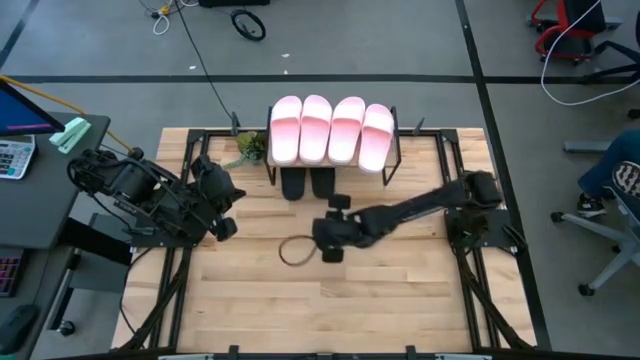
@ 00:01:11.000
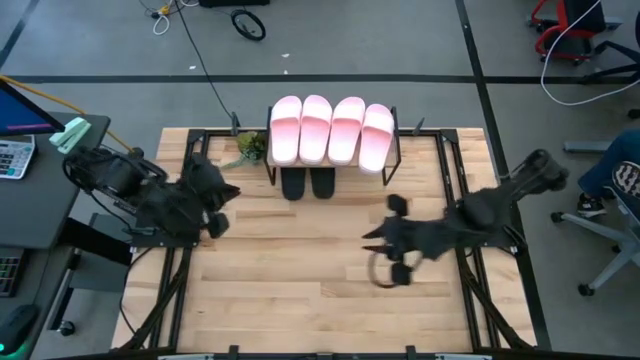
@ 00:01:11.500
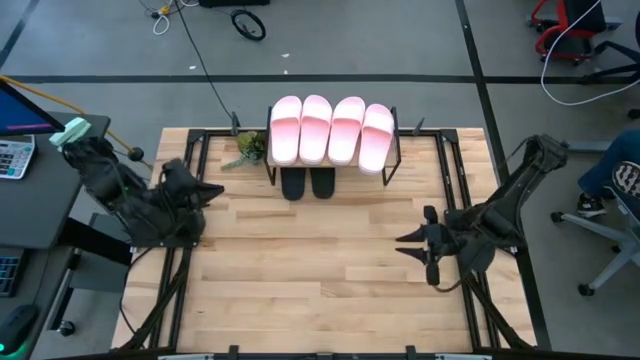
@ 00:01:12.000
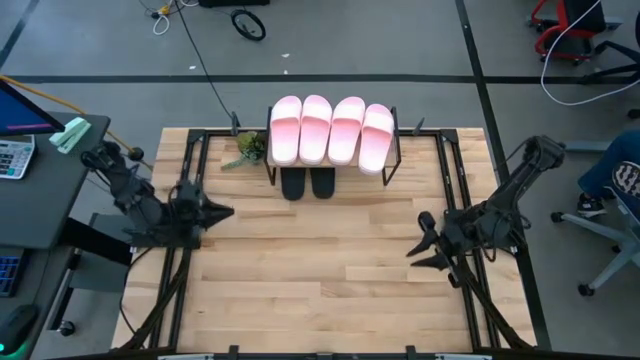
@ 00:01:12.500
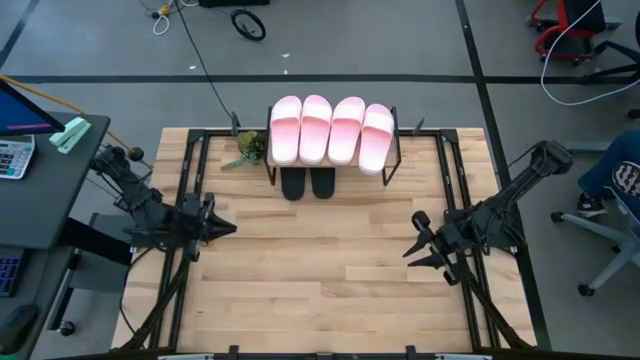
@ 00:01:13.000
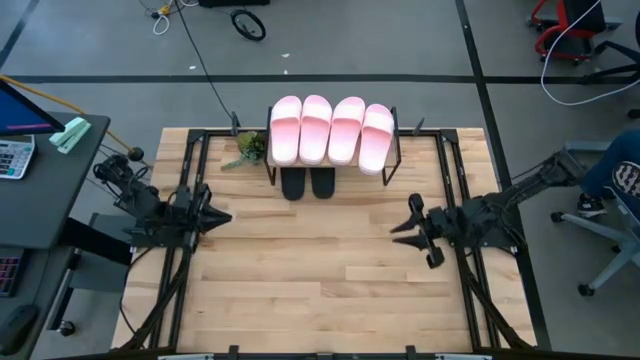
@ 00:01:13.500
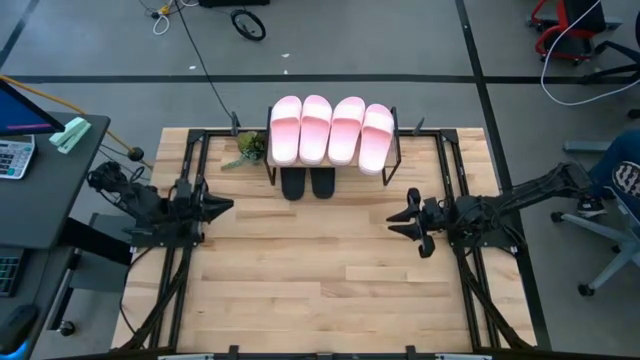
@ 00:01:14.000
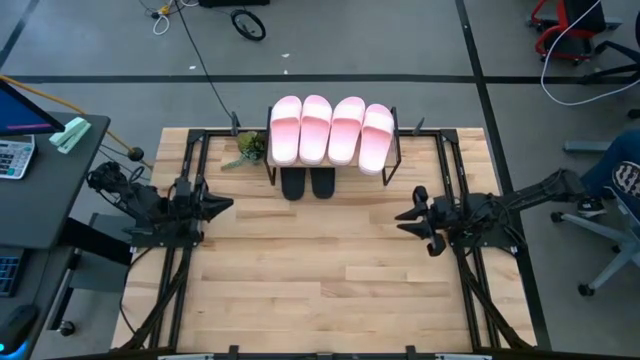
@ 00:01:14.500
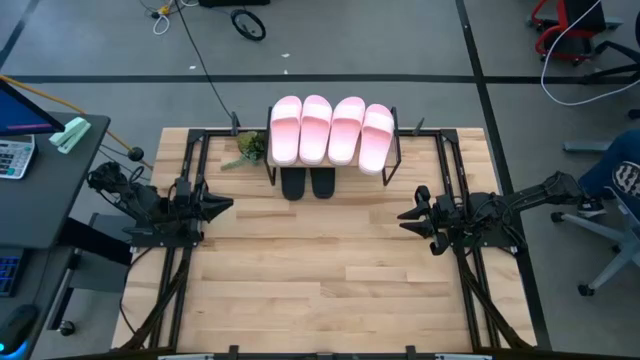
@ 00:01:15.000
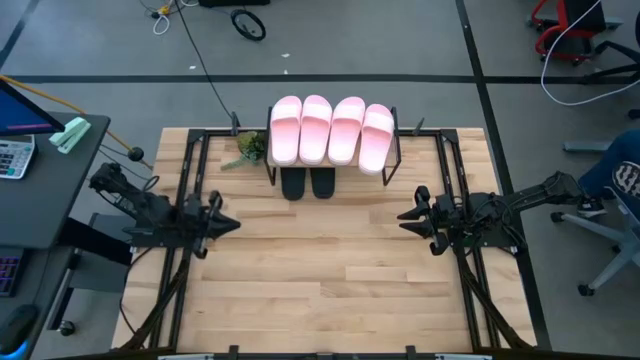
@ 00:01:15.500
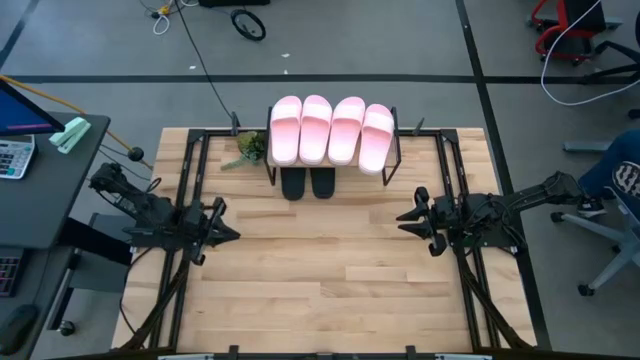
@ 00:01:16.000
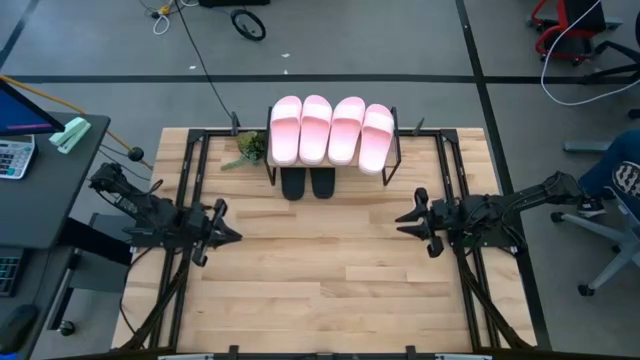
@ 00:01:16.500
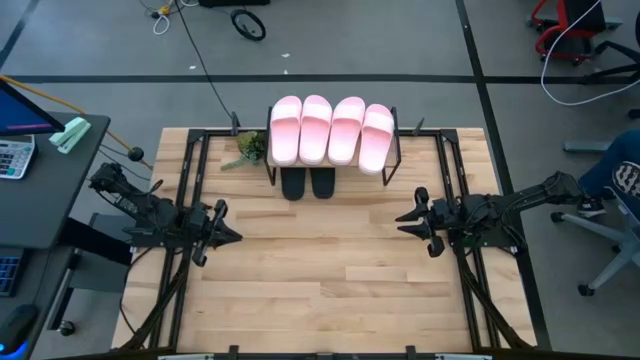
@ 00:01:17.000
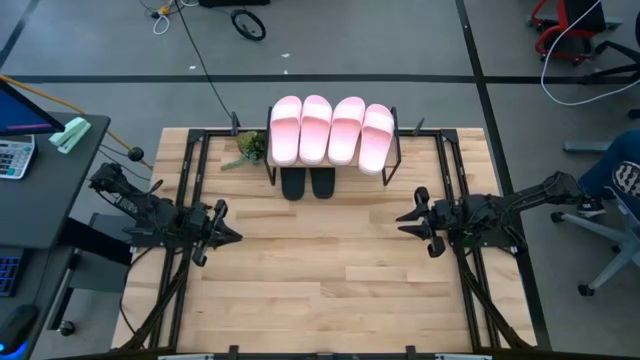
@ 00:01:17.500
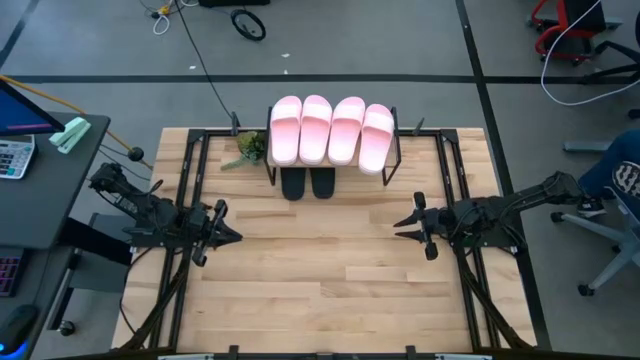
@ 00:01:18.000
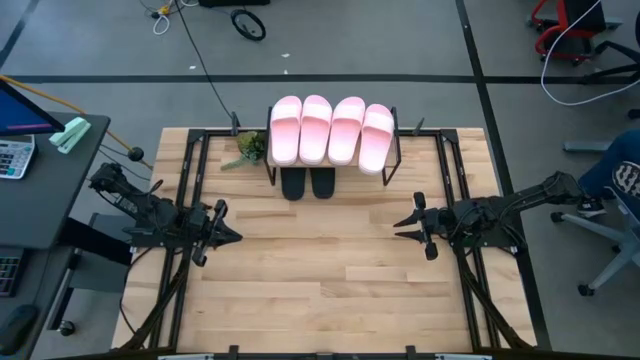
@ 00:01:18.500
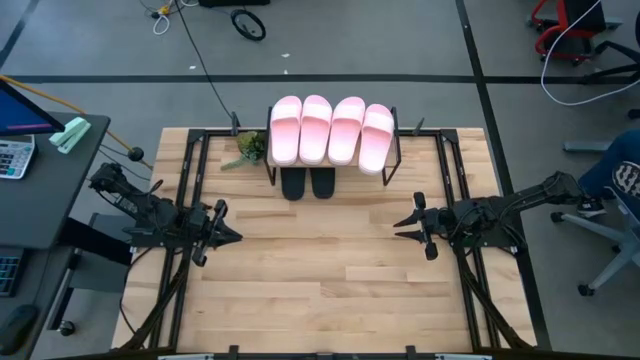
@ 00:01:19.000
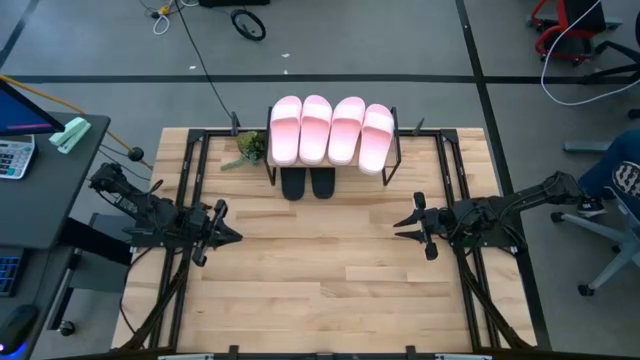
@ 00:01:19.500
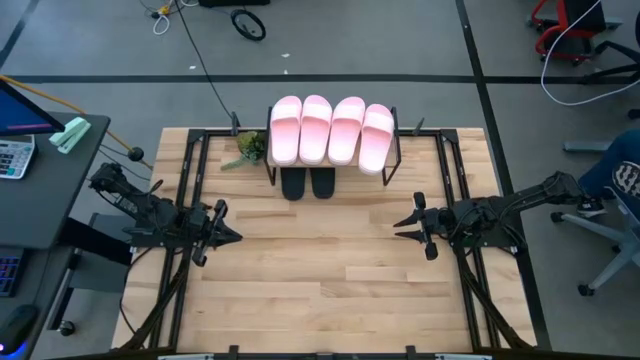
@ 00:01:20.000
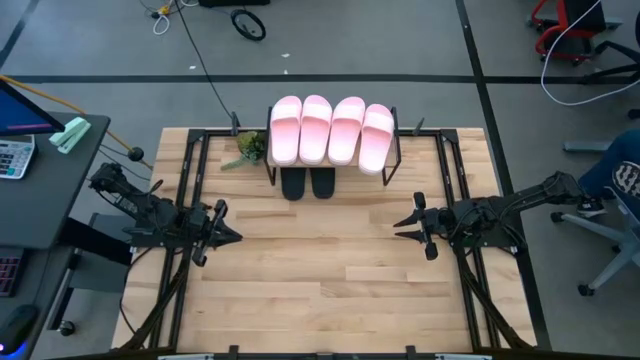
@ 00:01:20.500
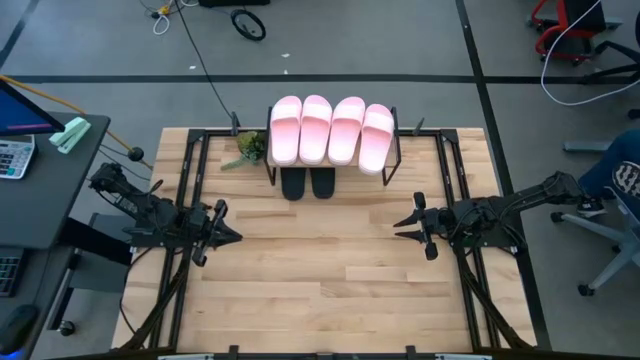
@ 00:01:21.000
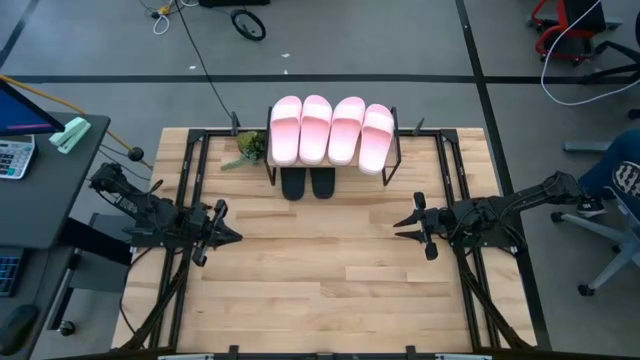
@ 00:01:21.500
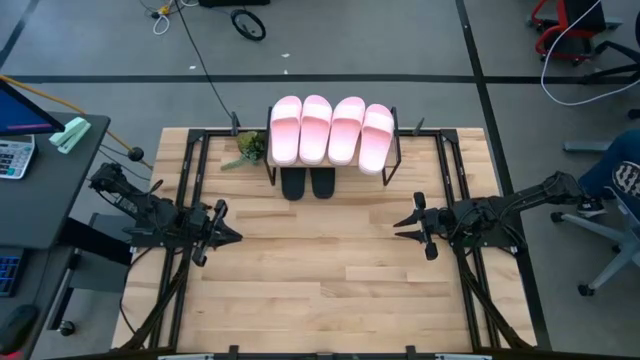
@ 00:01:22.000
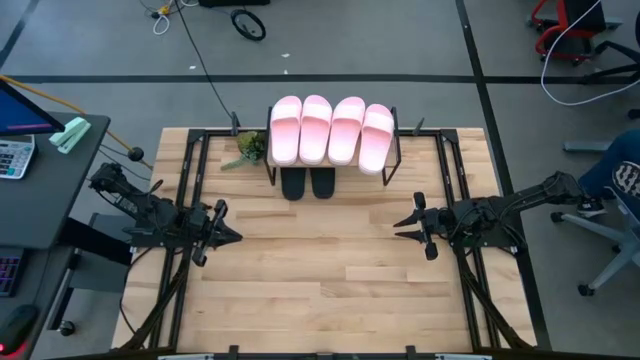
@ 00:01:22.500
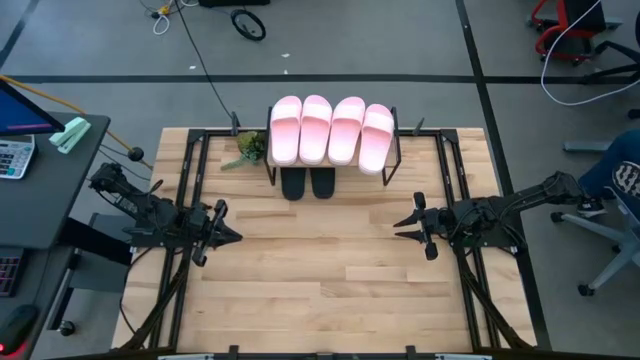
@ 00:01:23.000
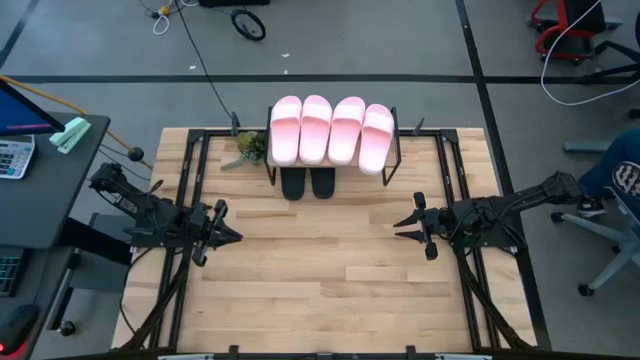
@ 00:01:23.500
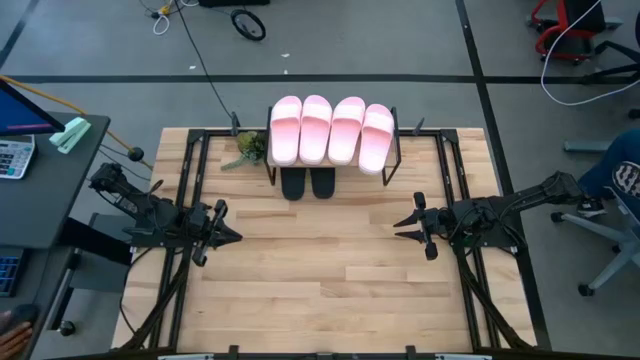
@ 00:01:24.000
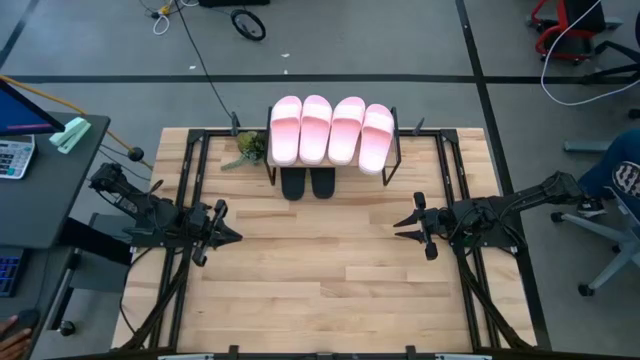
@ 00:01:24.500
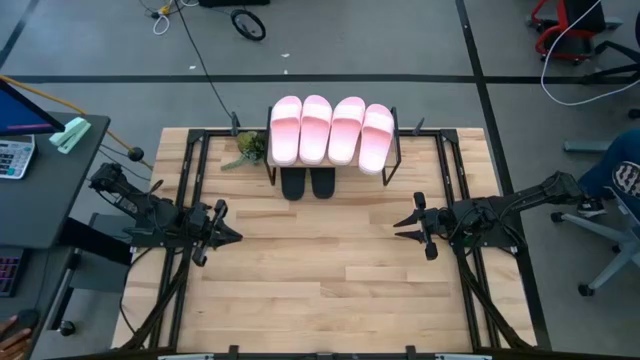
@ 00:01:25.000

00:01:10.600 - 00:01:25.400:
Task: Pick and place slides into the shelf
Return to Home Position

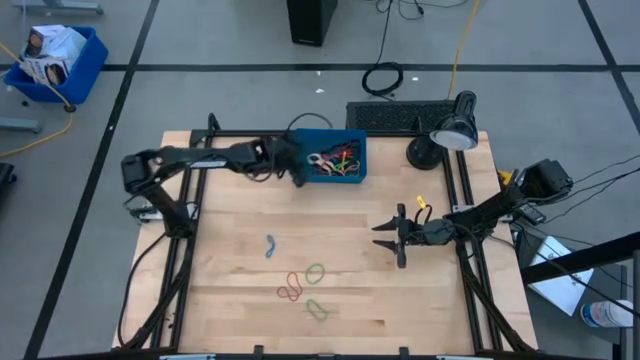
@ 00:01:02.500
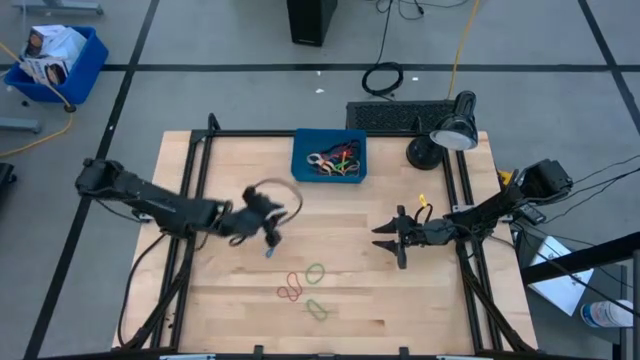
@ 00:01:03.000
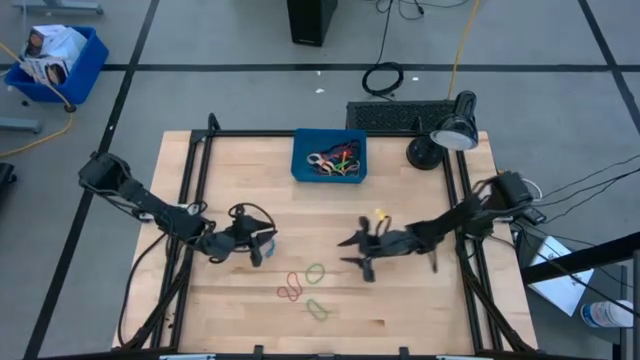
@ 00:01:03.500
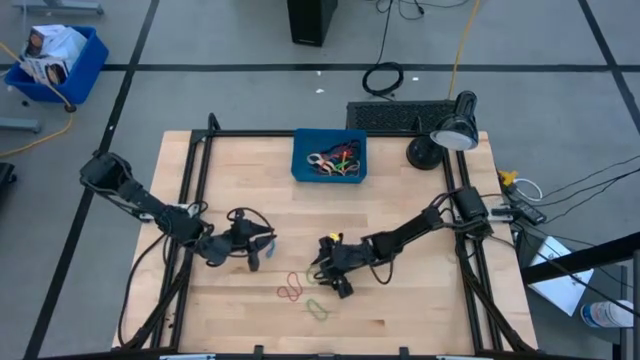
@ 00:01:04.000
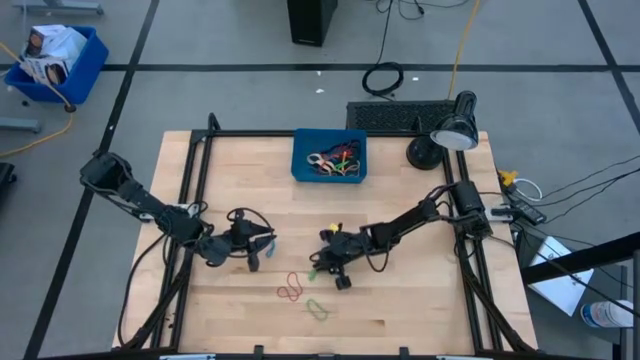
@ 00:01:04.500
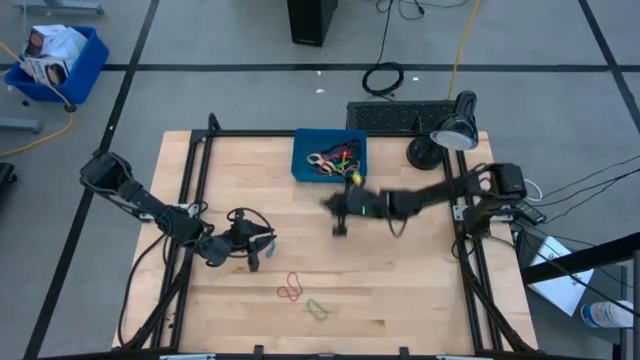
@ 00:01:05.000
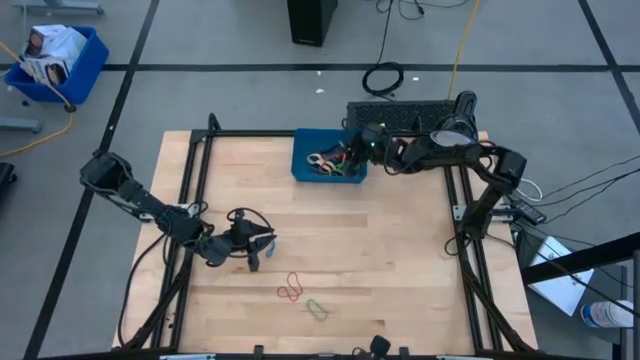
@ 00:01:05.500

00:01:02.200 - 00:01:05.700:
Task: Pick and place rubber bands into bin
Put the green rubber band into the blue bin

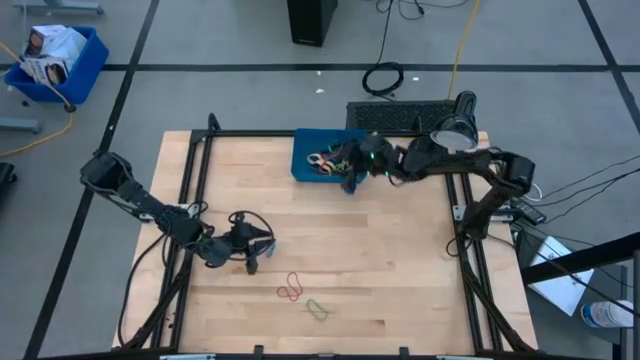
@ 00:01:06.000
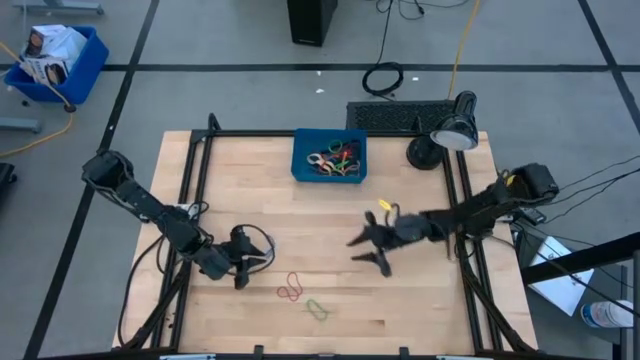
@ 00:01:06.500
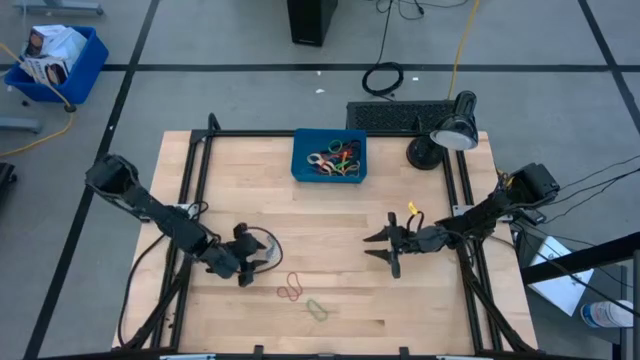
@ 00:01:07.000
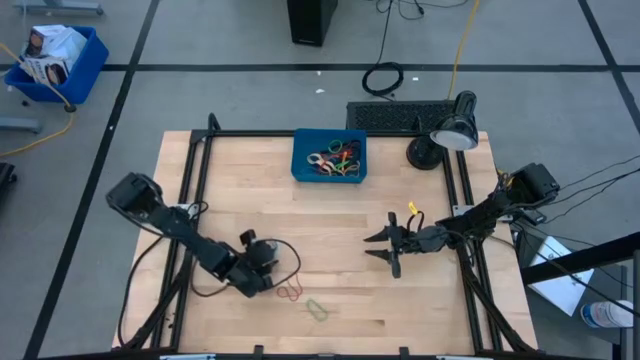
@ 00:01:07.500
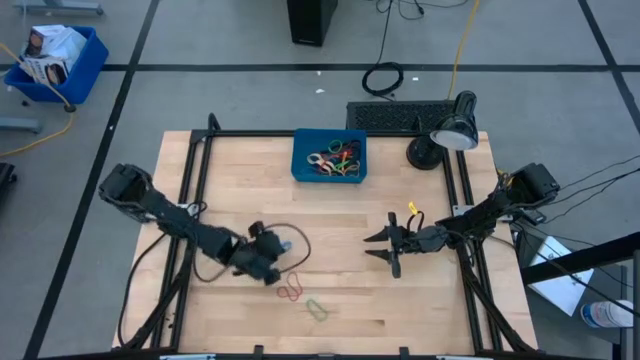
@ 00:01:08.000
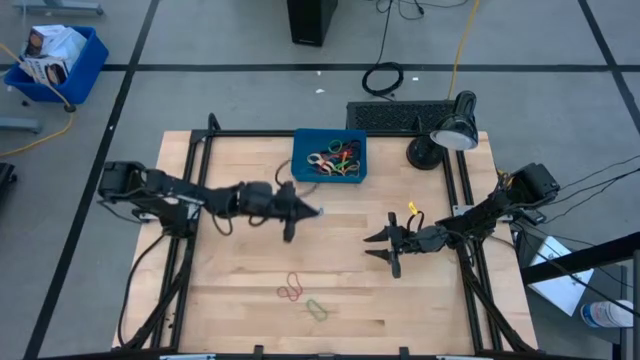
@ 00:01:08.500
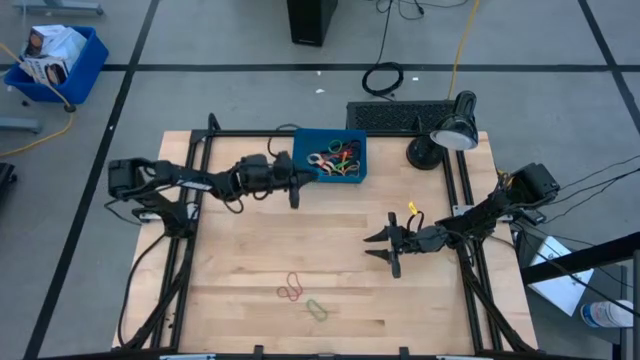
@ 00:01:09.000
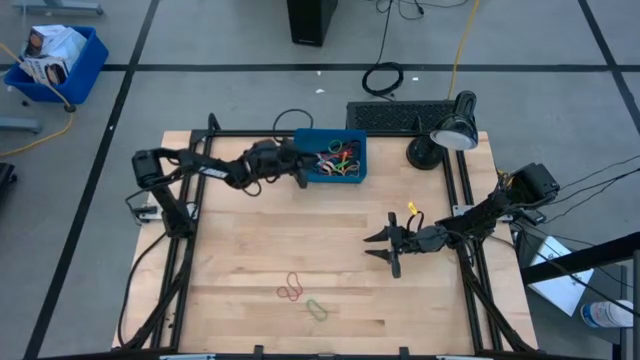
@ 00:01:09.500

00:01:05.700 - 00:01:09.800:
Put the blue rubber band into the blue bin
